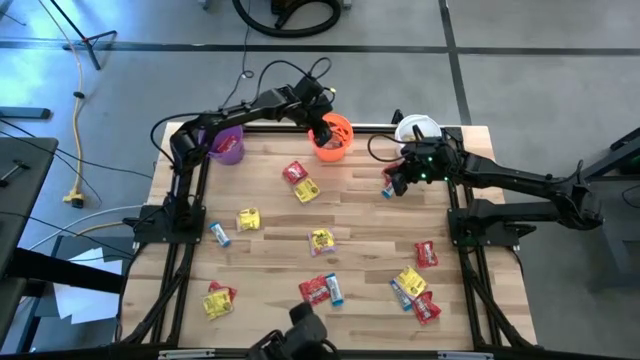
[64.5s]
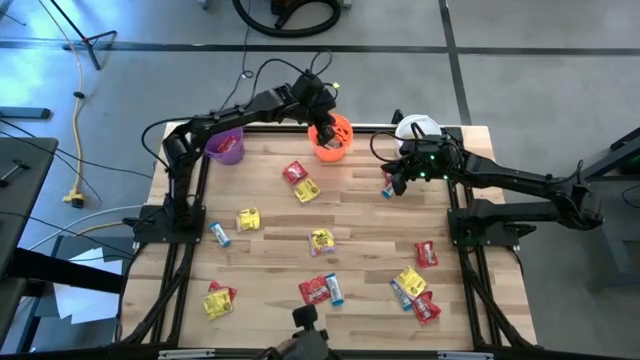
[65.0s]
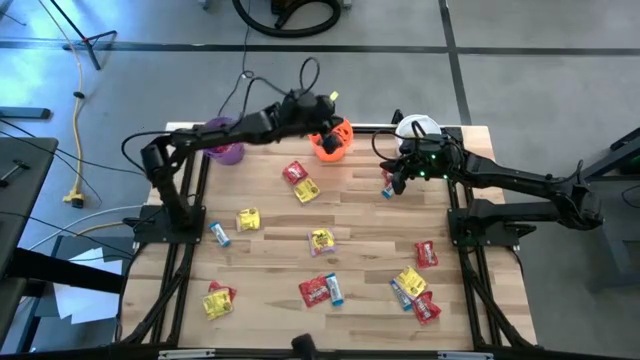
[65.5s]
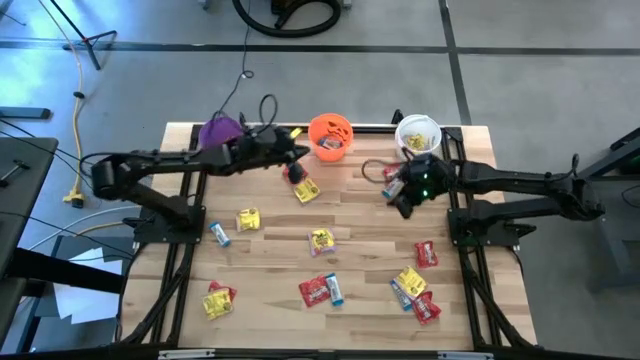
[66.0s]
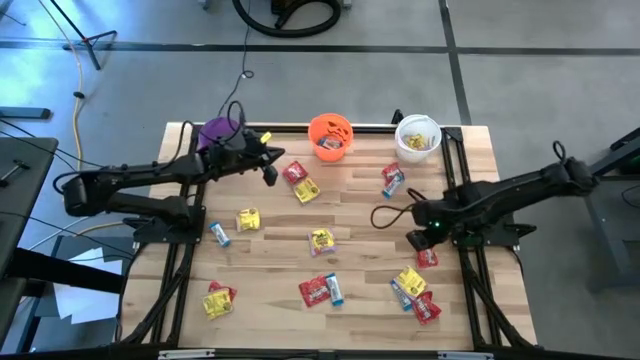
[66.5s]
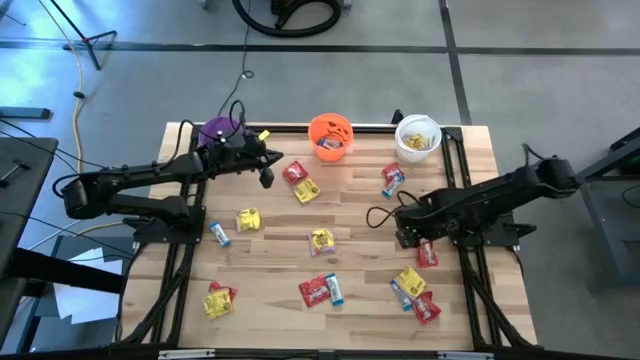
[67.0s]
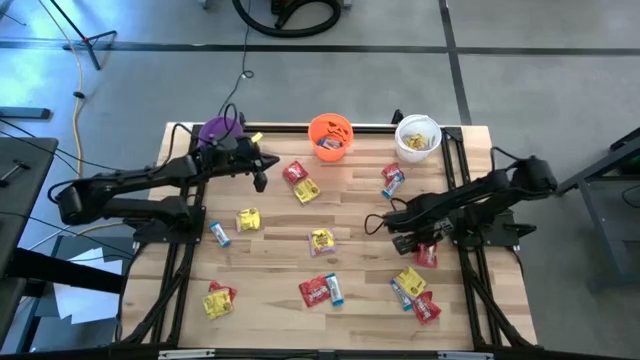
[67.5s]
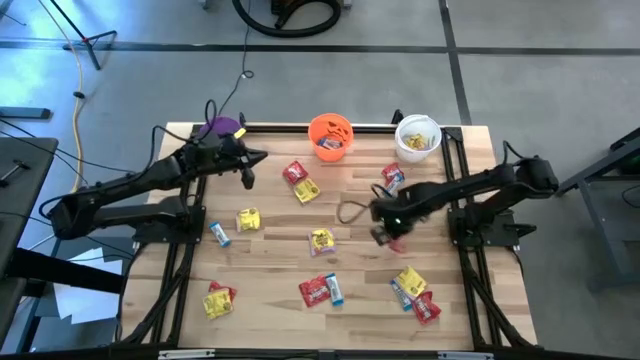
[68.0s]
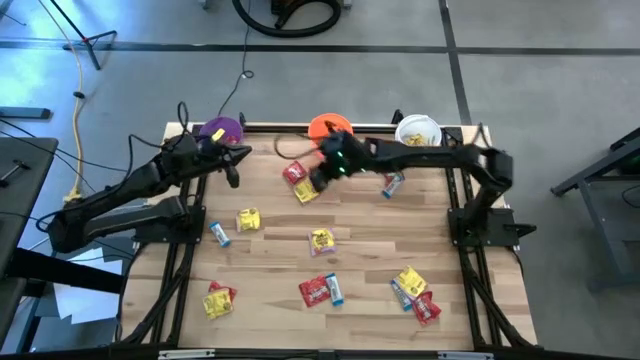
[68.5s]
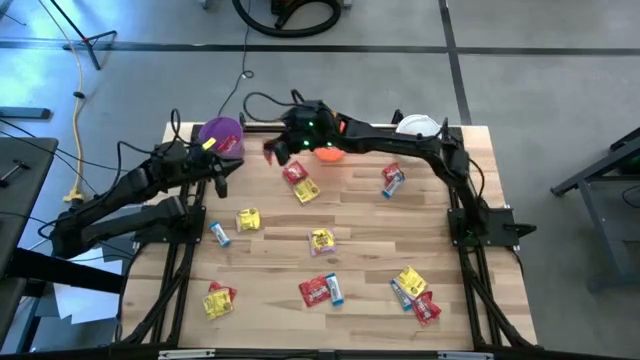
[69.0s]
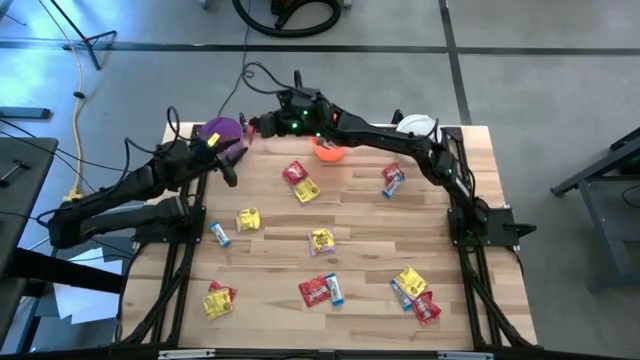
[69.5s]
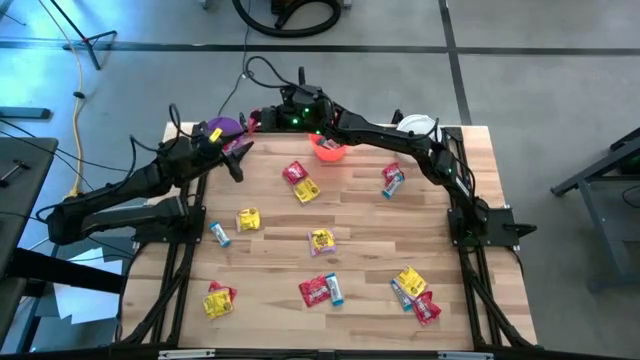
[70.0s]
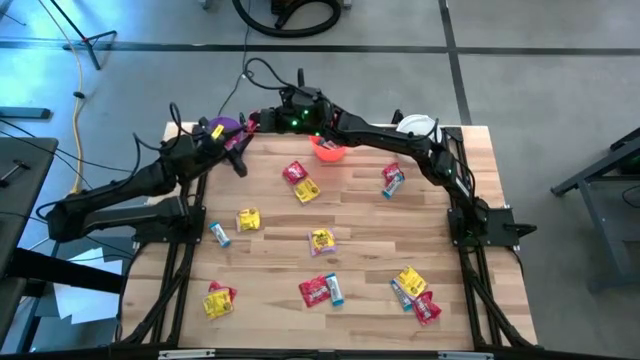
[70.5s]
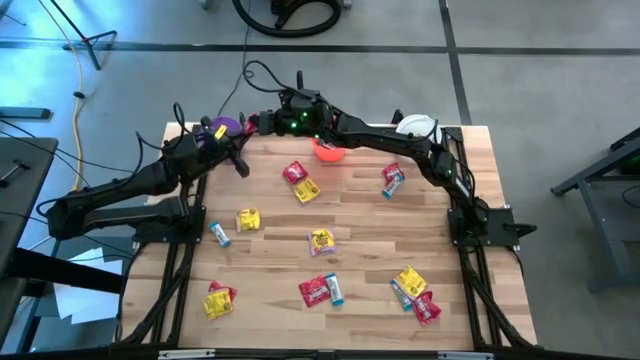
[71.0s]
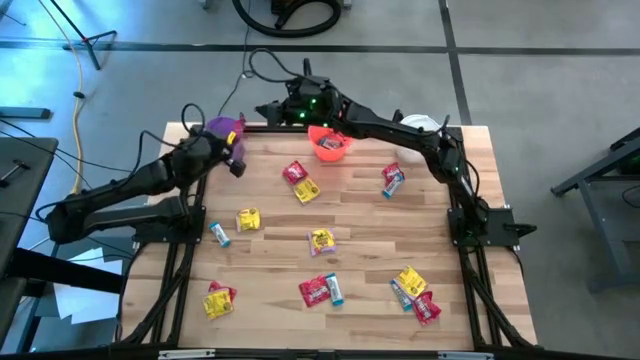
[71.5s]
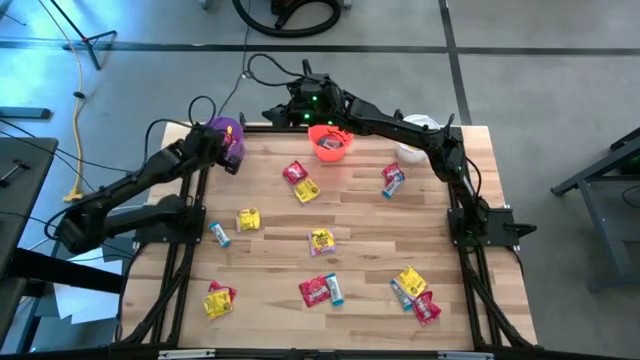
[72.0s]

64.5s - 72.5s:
Task: Organize candy in baskets
Put the red candy into the violet bucket

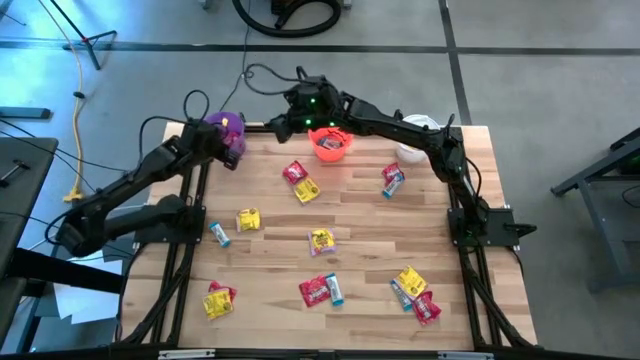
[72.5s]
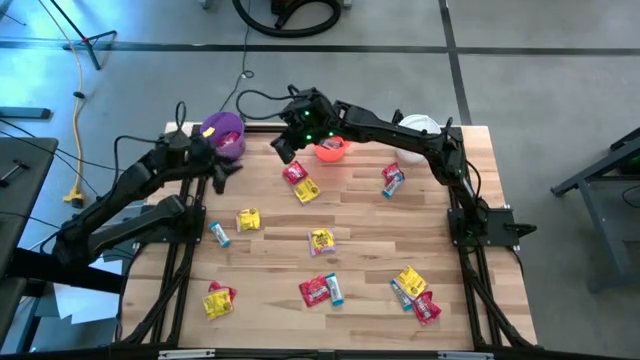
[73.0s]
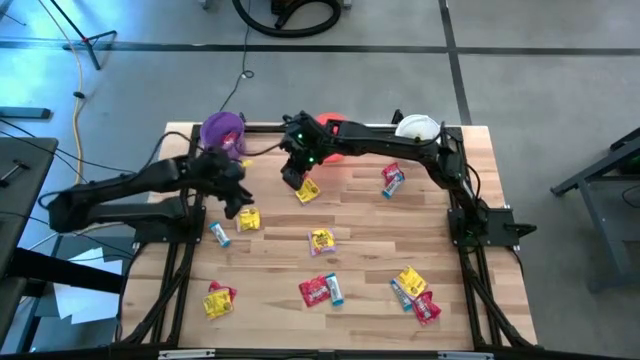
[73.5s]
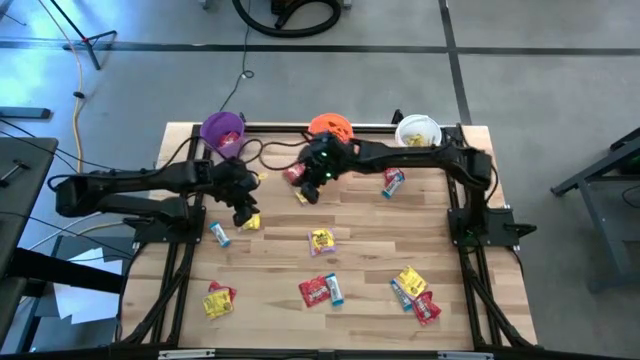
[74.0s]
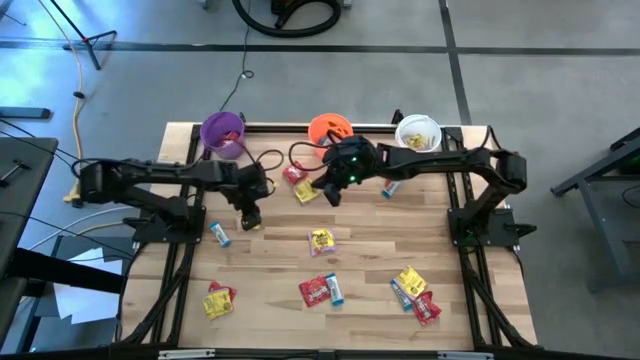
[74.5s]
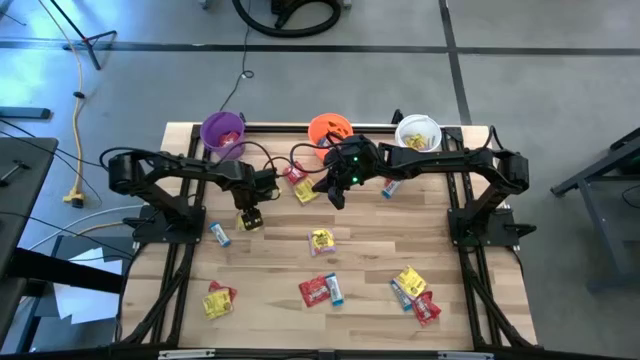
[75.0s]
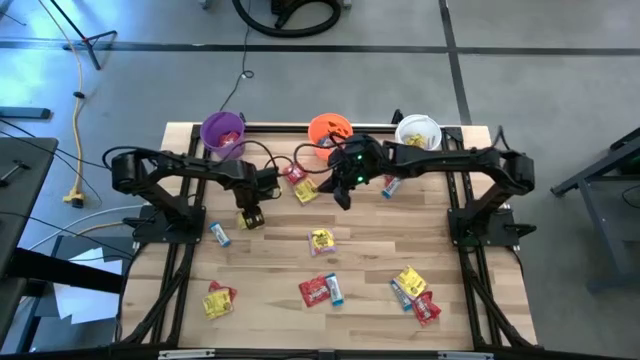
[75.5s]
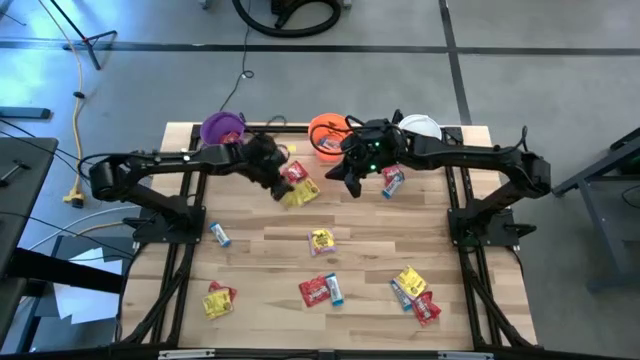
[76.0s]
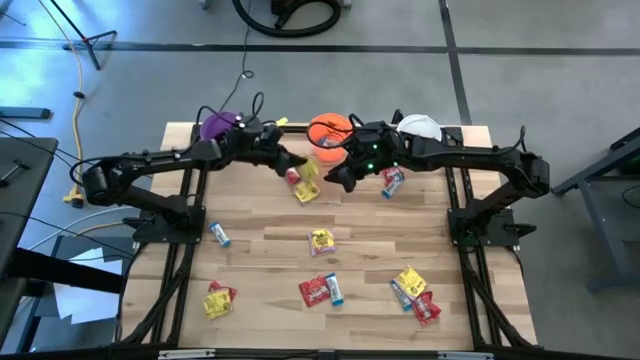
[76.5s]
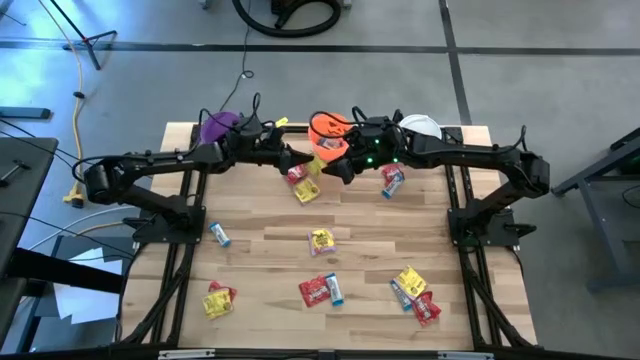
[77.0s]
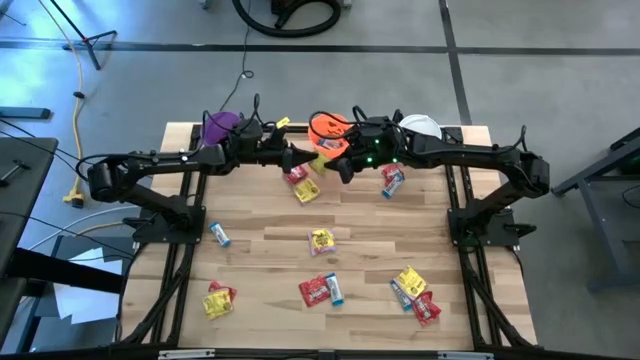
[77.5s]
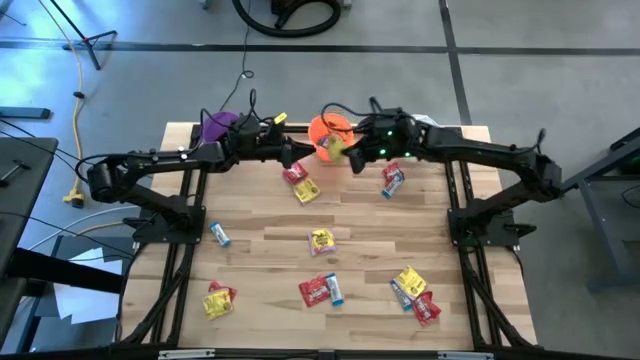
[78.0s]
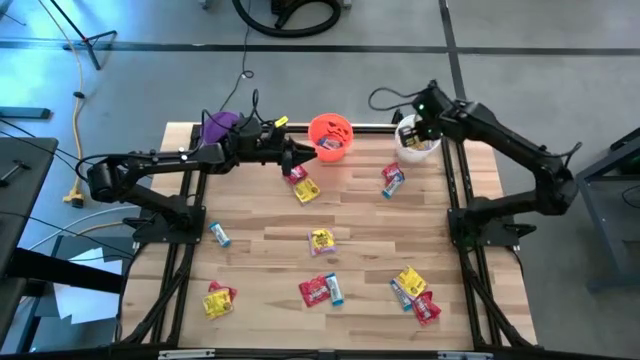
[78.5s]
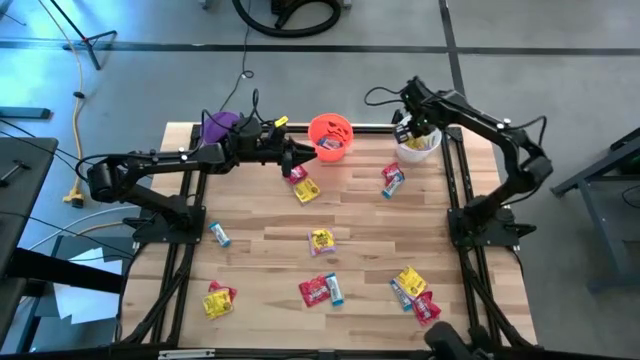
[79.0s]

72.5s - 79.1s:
Put the yellow candy into the white bucket

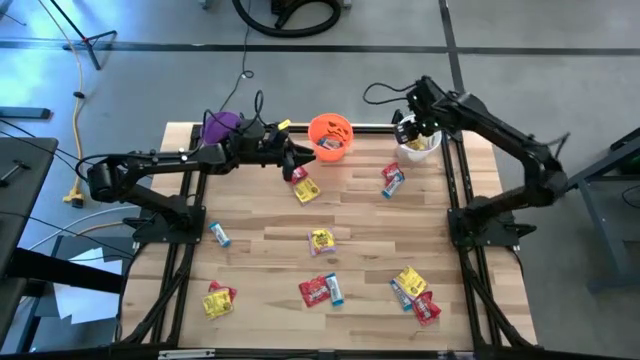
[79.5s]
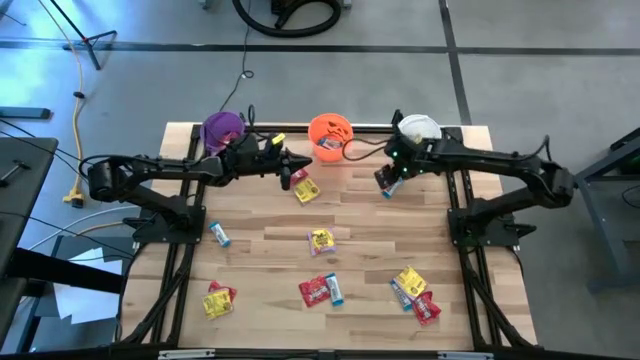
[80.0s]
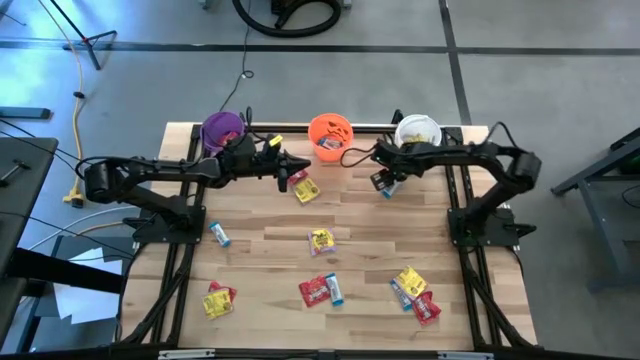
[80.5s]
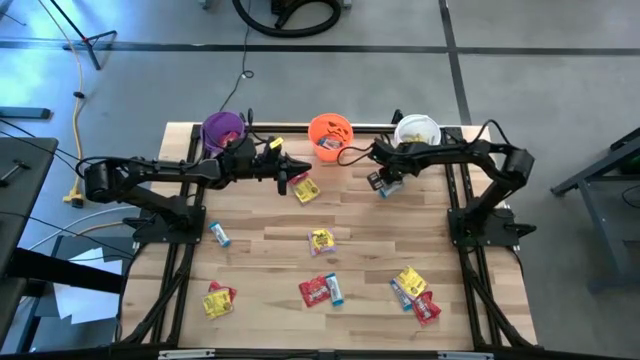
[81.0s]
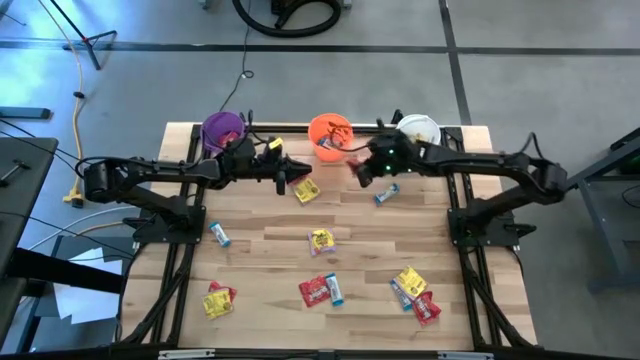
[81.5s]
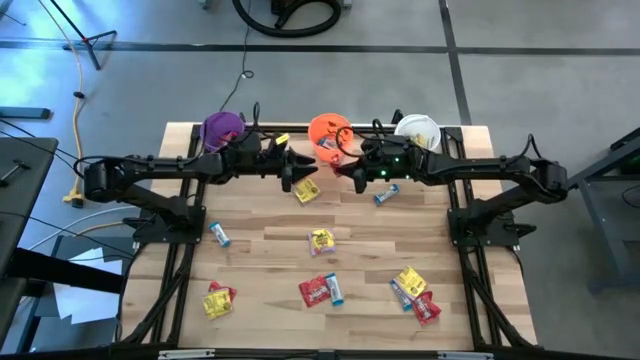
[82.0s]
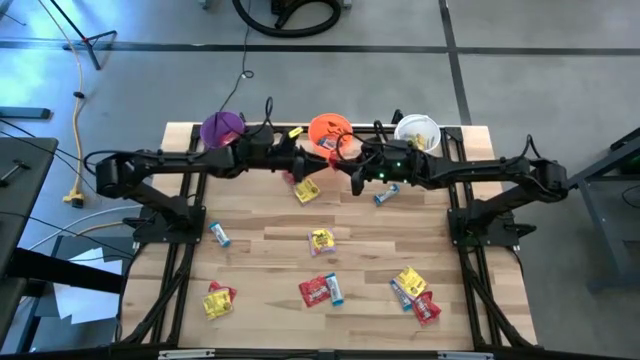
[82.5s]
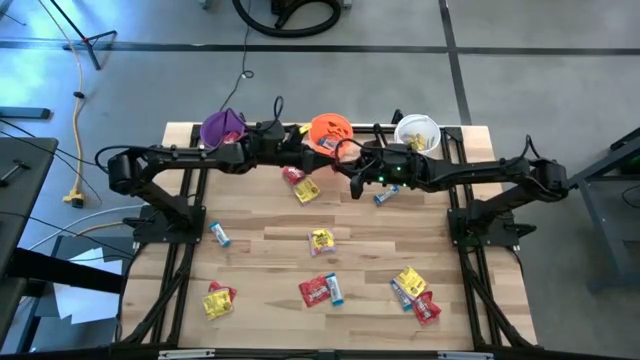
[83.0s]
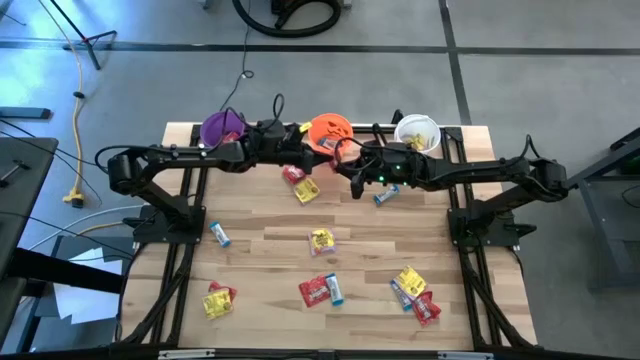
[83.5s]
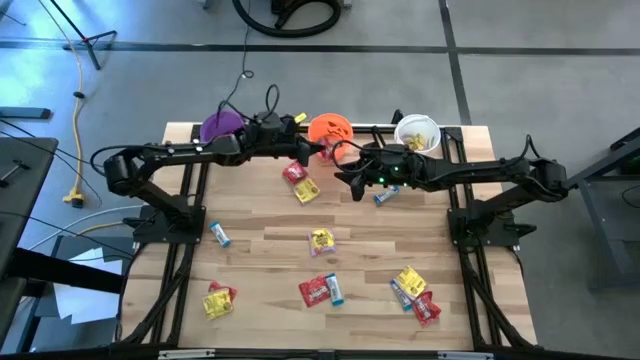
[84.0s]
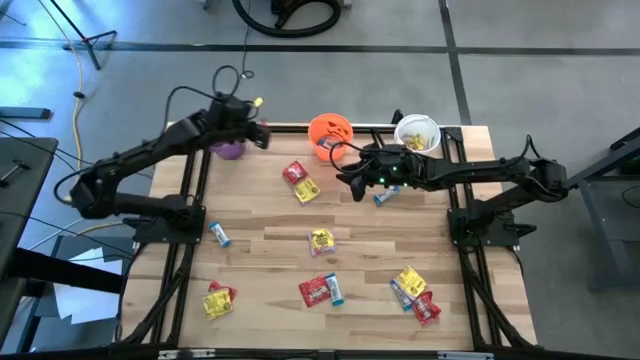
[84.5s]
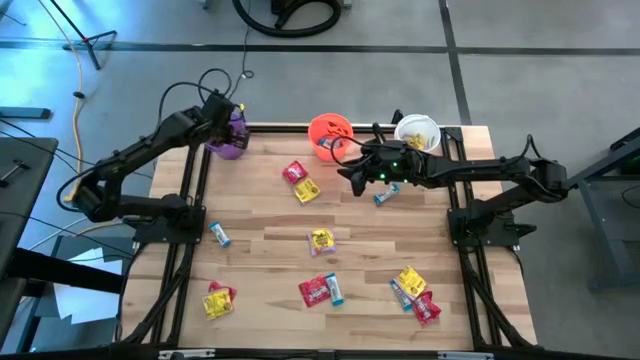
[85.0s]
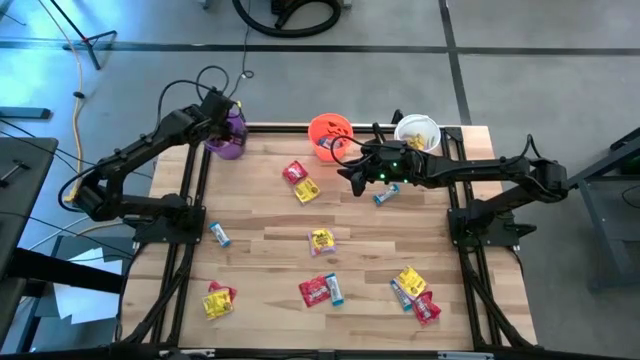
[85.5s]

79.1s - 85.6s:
Put the red candy into the violet bucket
